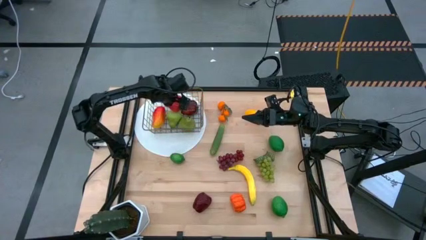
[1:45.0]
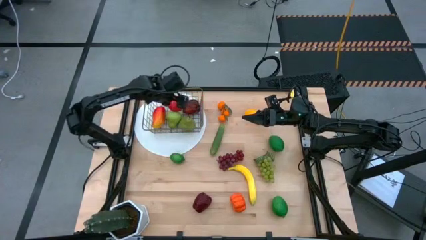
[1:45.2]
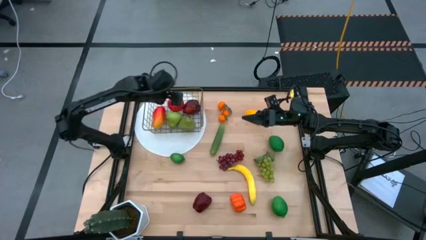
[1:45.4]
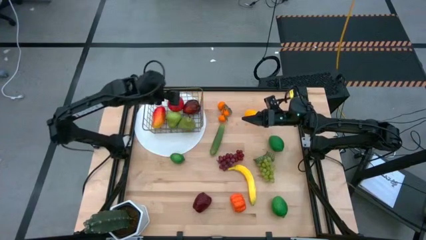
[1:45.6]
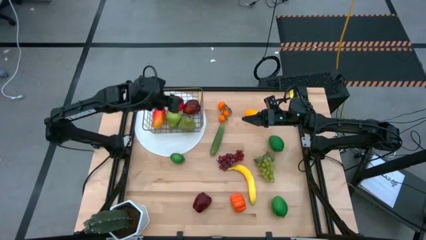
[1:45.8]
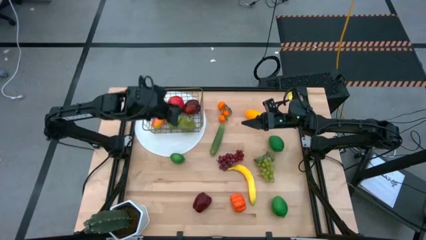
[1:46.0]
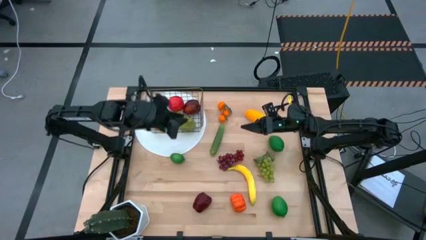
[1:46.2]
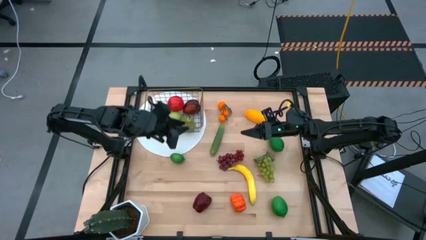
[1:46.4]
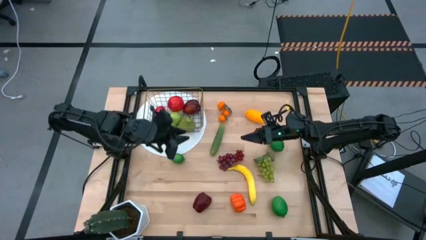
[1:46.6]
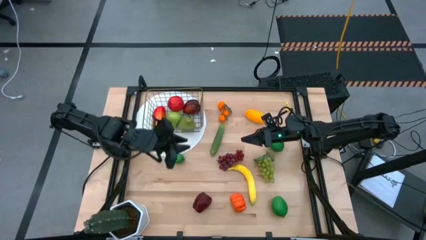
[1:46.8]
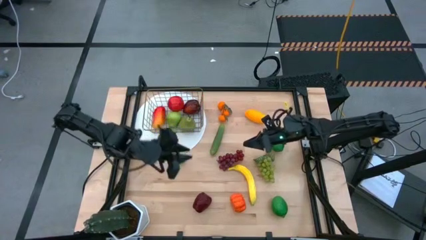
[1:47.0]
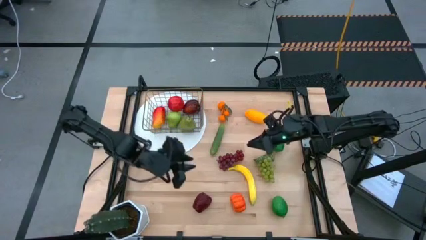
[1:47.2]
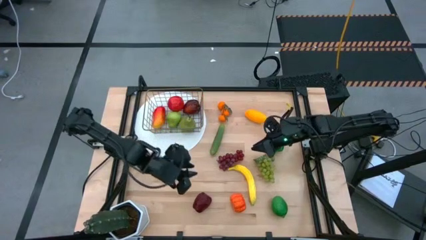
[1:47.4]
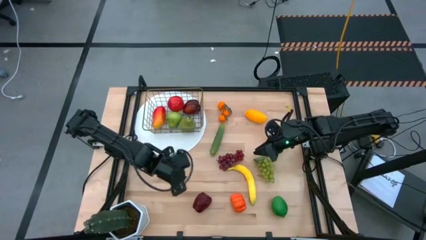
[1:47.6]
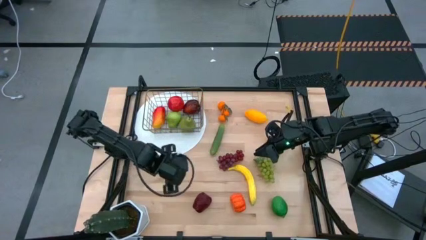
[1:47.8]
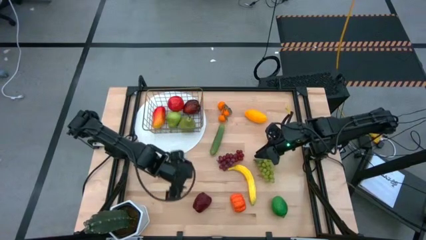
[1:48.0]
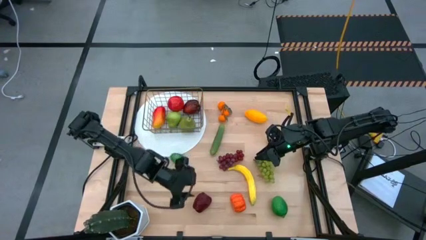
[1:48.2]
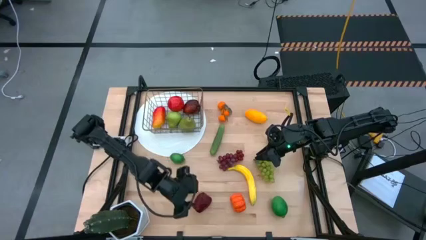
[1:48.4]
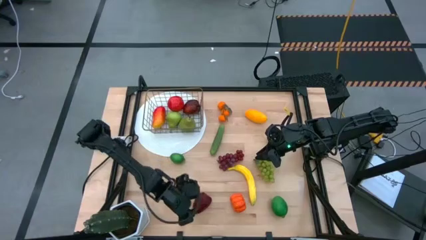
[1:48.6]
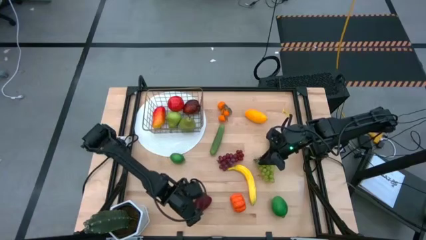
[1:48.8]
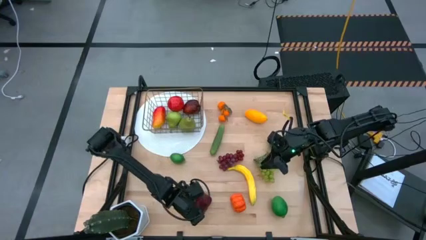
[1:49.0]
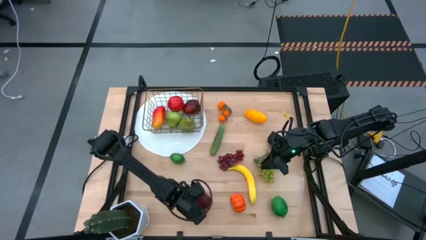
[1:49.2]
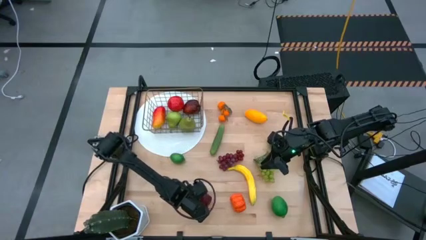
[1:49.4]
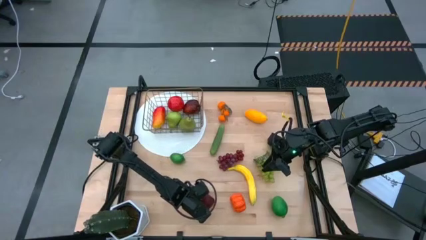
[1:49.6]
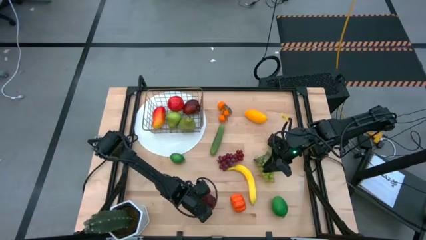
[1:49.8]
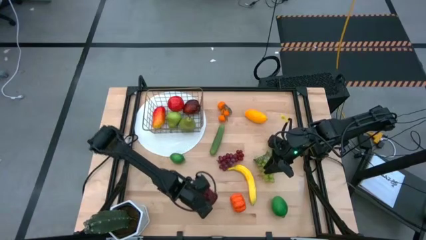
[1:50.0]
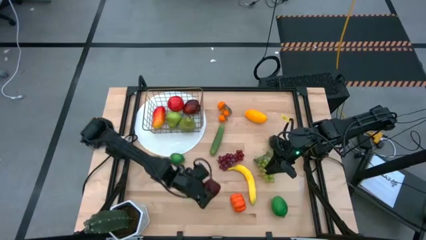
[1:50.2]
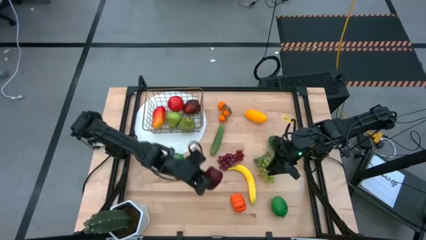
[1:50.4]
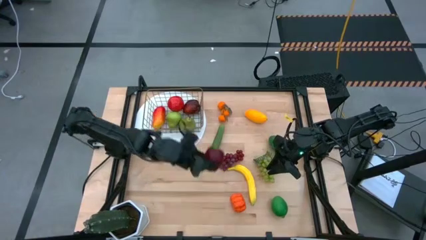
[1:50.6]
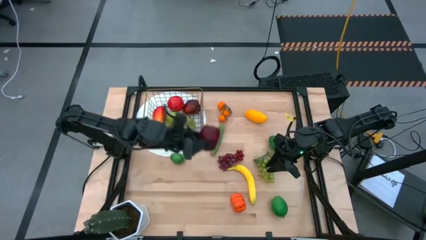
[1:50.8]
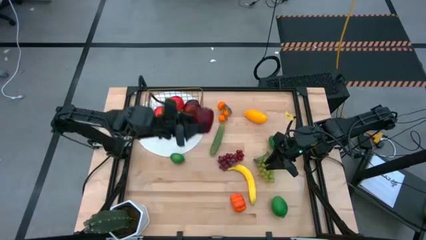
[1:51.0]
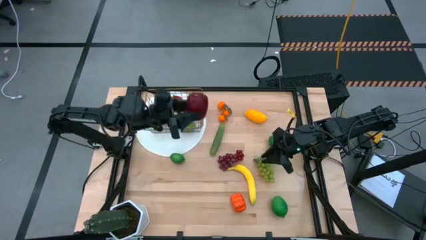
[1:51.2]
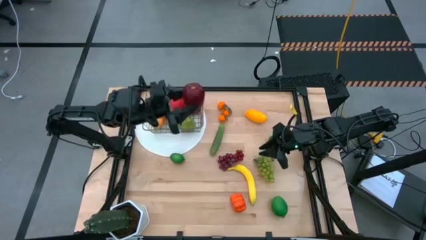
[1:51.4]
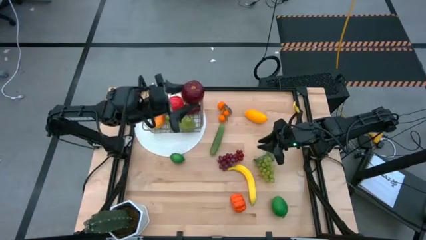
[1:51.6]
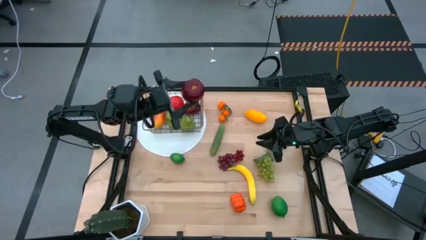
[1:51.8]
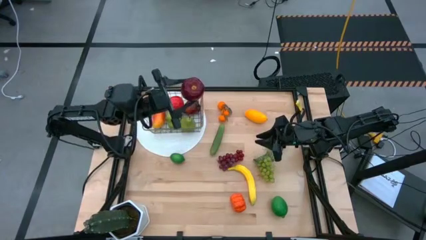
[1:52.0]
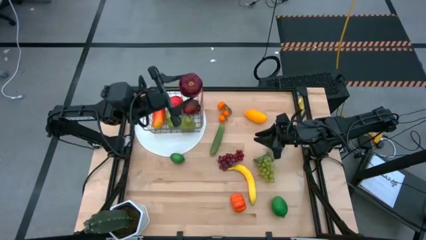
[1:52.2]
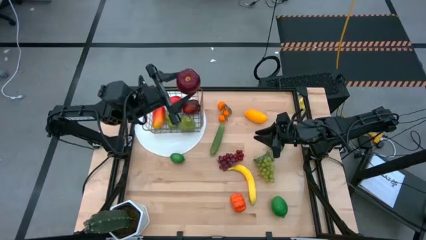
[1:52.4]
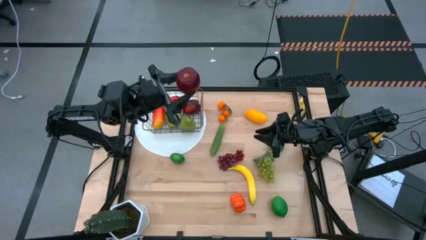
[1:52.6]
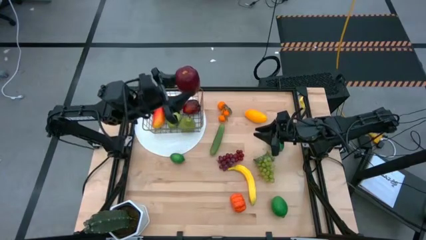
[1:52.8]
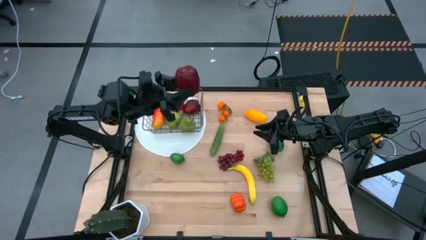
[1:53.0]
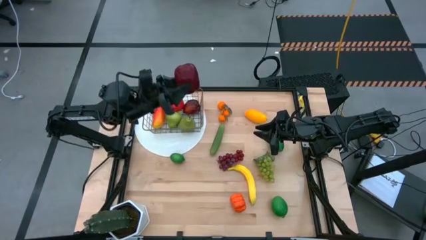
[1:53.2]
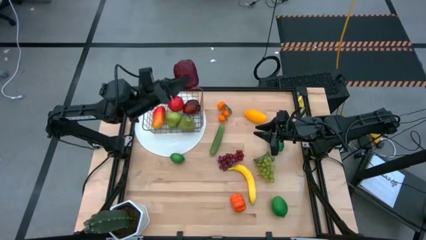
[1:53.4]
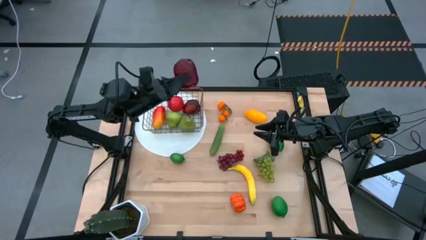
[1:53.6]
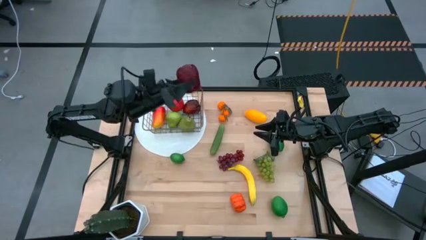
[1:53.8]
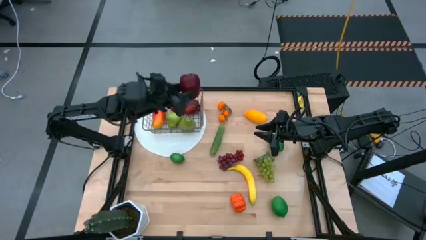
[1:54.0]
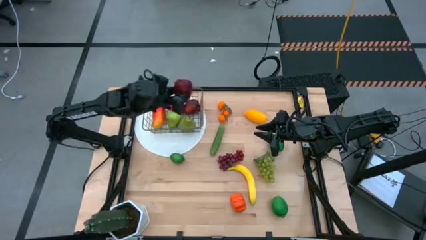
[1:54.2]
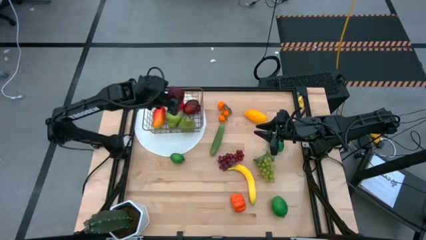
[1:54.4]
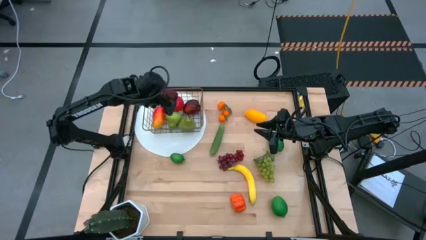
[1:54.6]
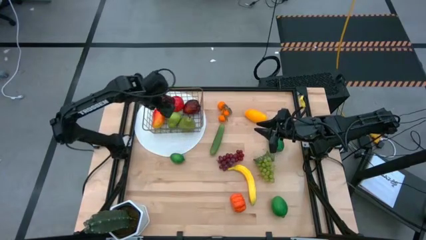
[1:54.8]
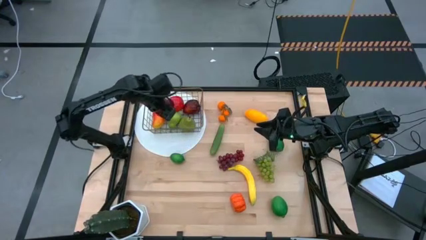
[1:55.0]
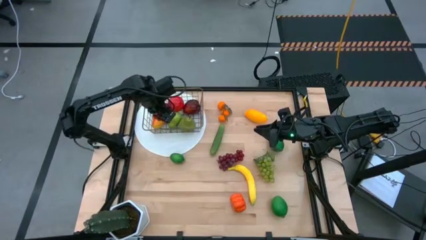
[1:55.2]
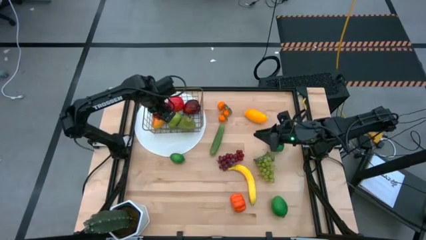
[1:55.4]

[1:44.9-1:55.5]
Task: Build produce basket
Put the apple into the wired basket

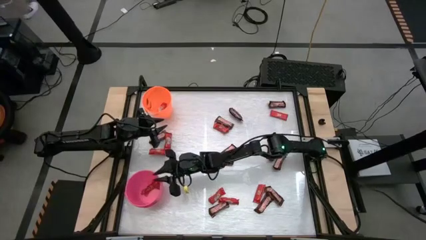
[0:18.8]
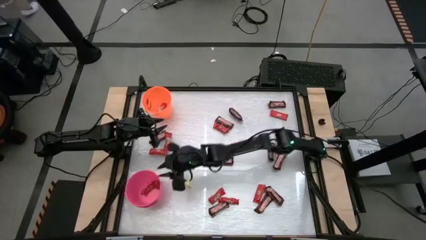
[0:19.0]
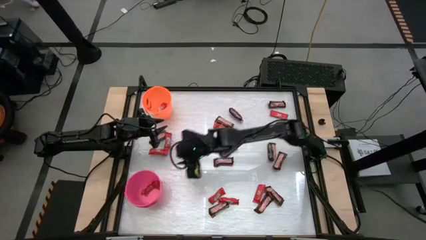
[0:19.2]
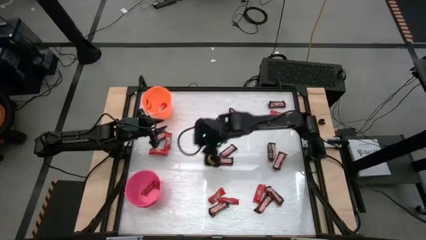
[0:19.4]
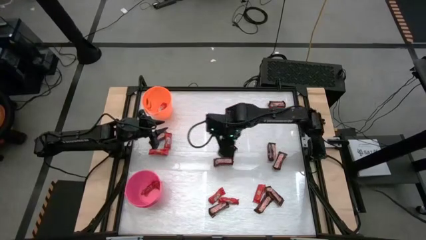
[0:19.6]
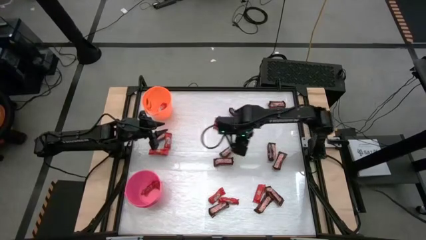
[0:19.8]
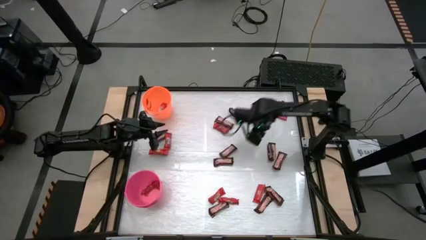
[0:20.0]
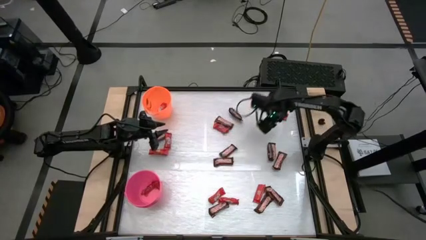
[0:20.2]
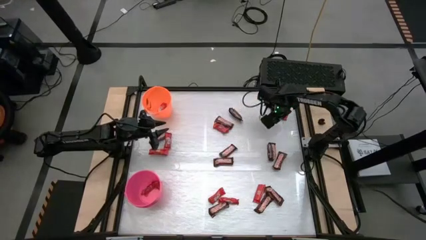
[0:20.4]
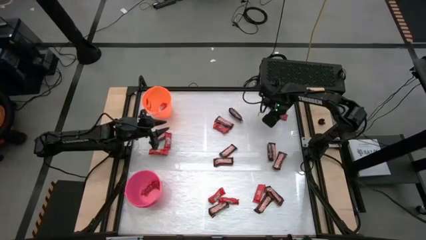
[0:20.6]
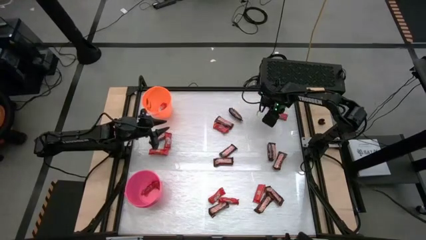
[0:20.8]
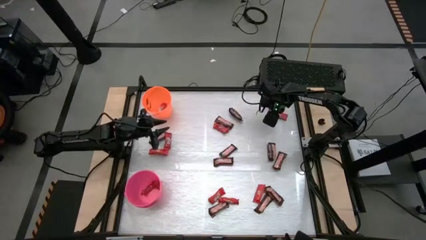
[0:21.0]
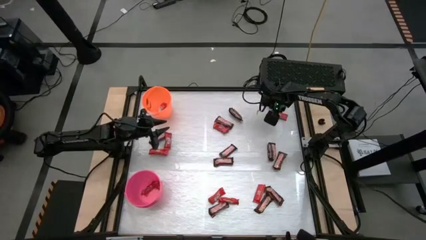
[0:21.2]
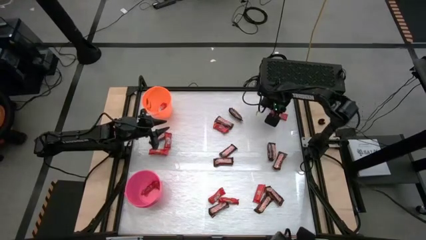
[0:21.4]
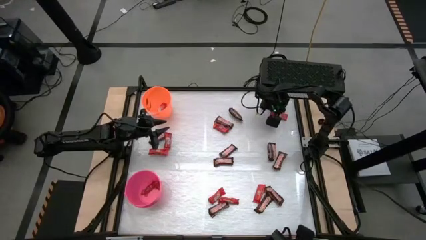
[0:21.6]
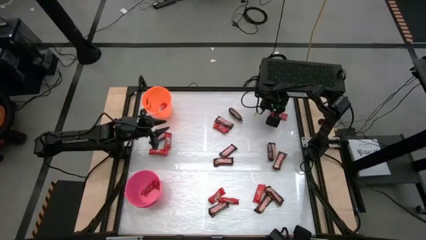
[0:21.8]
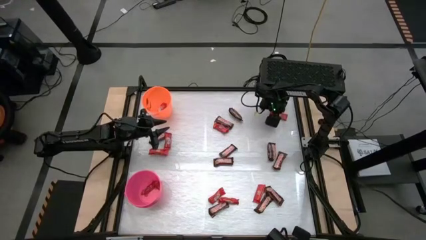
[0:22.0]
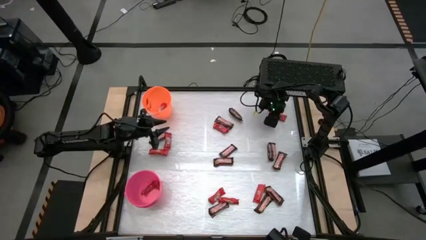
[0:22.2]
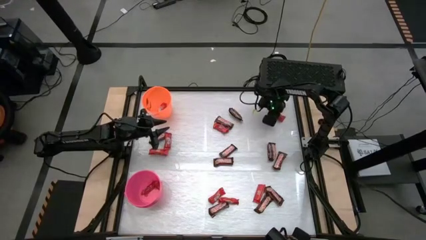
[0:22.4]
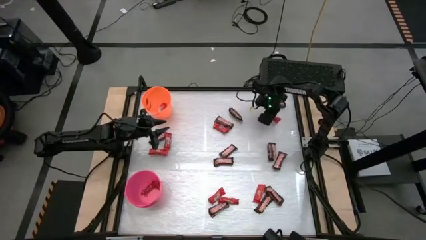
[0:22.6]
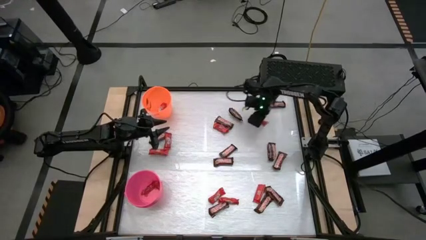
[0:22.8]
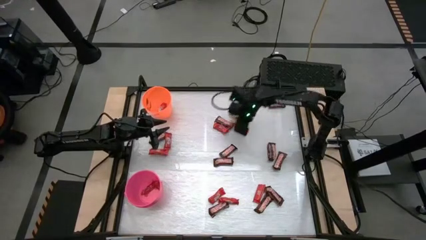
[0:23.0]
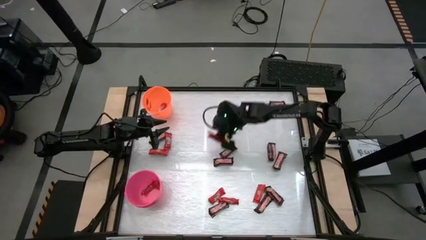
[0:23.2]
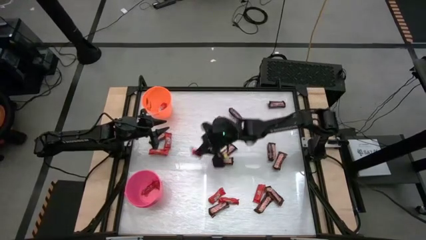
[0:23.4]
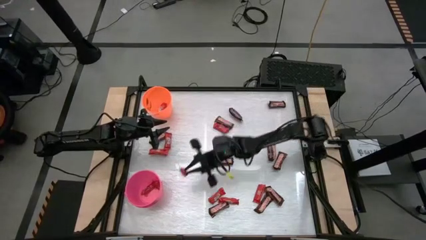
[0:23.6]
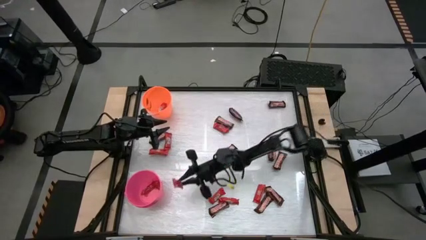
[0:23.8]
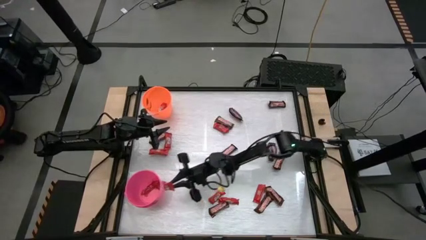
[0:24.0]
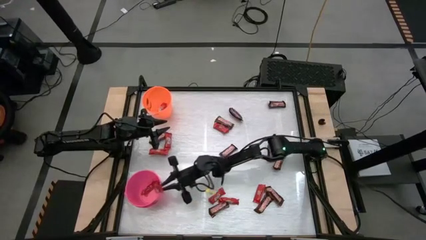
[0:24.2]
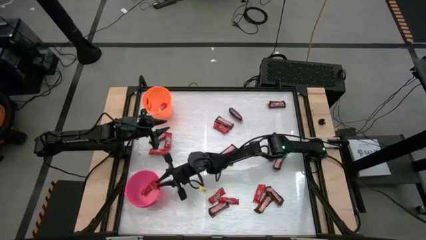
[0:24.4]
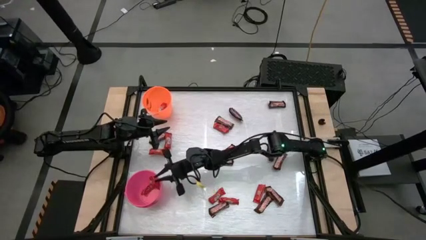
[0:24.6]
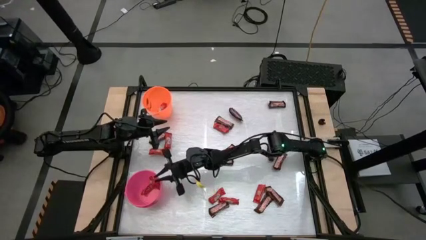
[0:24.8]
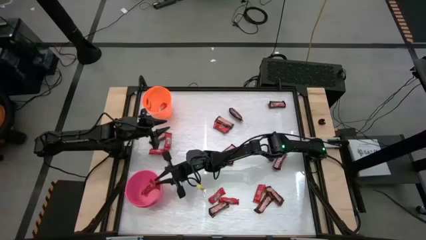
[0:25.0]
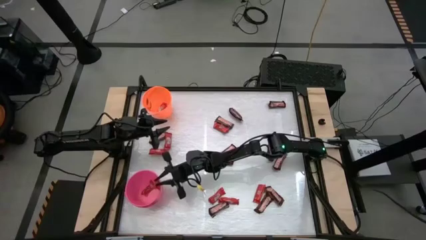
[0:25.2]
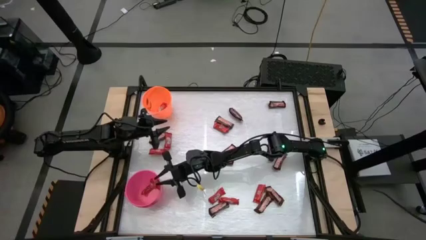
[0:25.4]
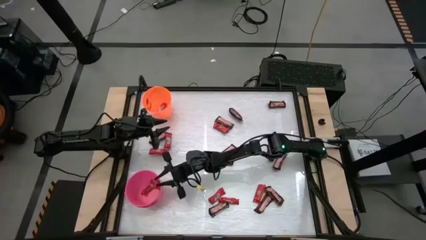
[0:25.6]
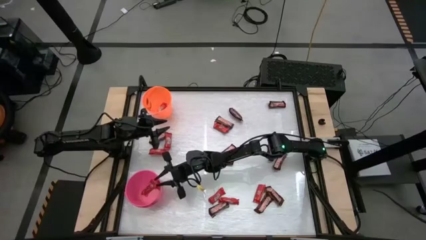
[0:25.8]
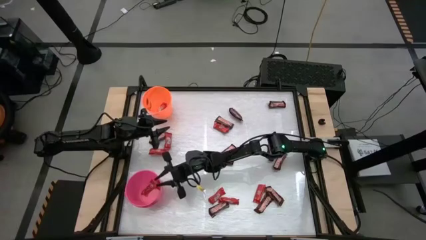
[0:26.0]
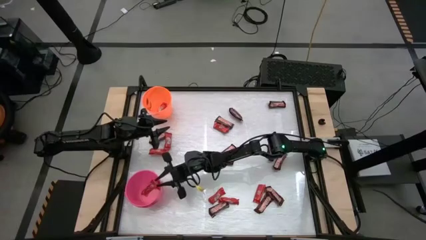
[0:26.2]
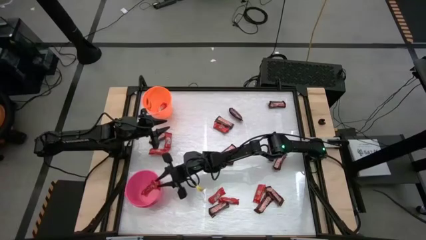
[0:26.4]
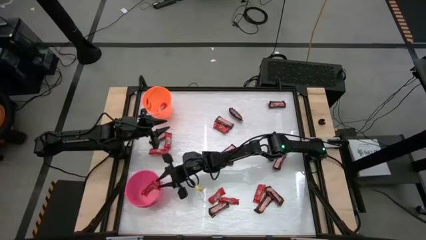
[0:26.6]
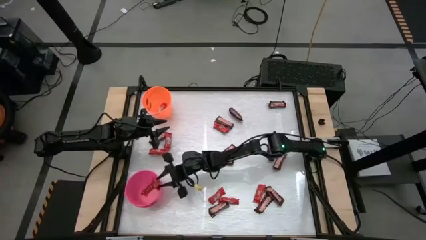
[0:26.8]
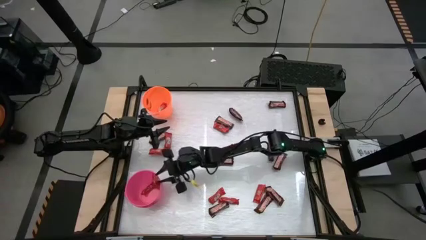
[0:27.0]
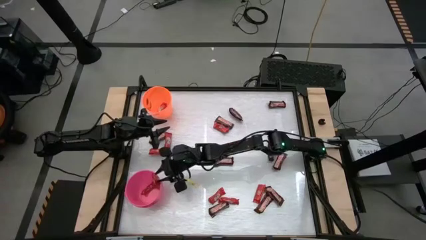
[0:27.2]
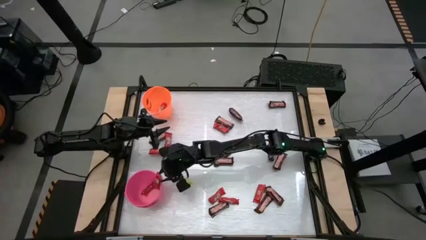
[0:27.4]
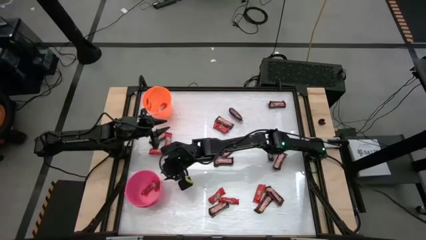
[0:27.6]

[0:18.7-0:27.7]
Task: Sort candy by brand, put in halloween buckets
Put the red chocolate bar into the pink bucket
